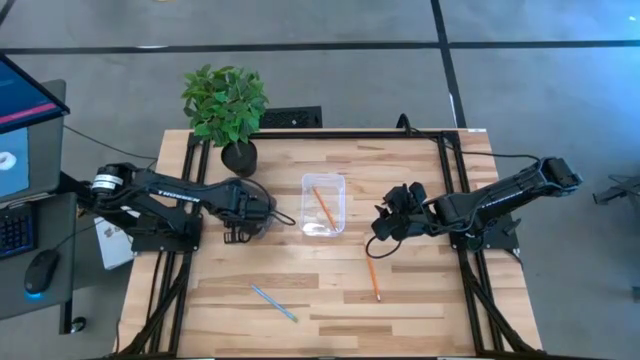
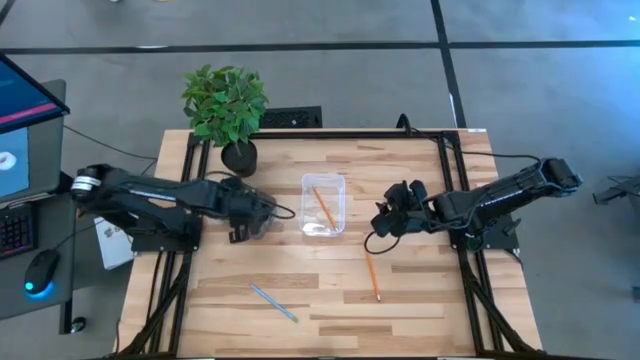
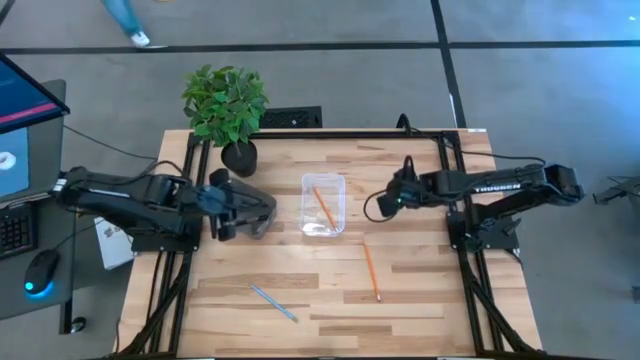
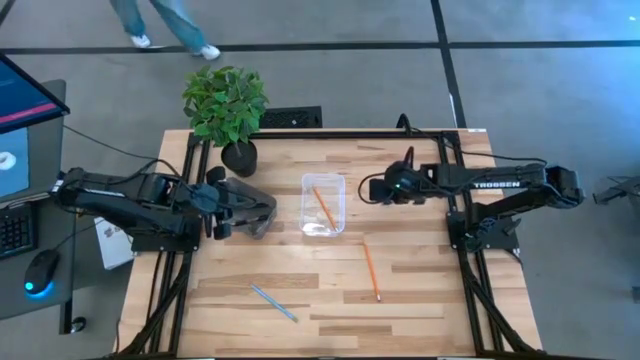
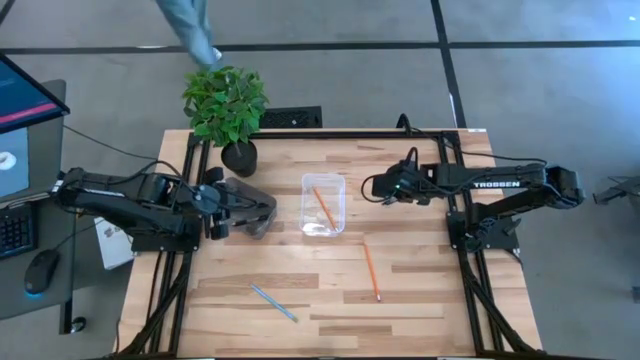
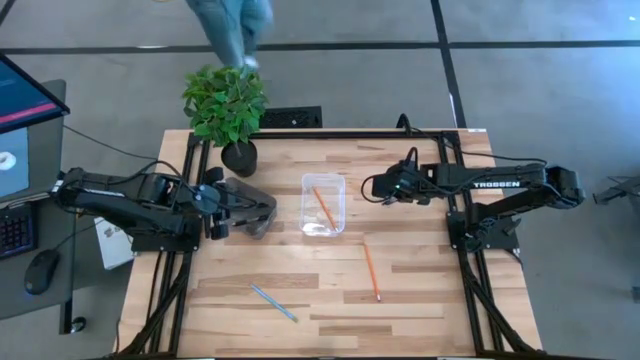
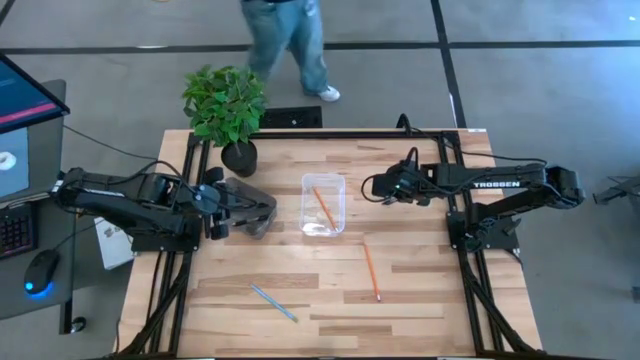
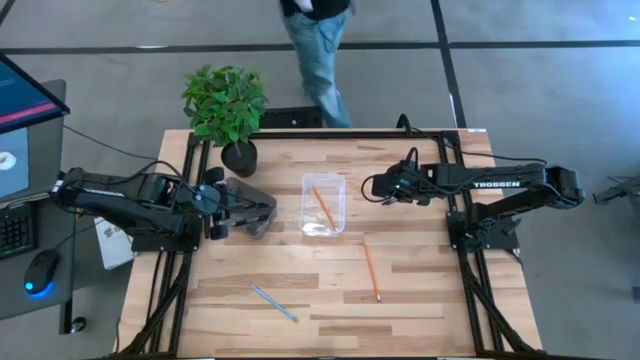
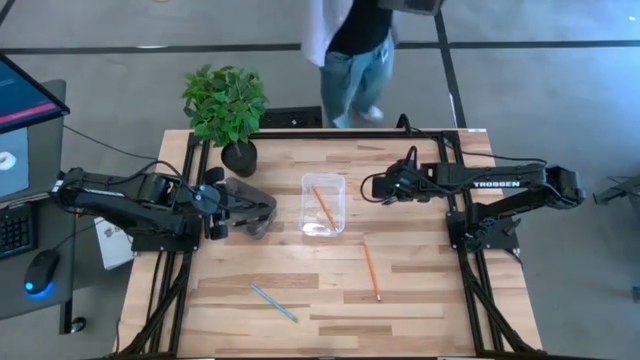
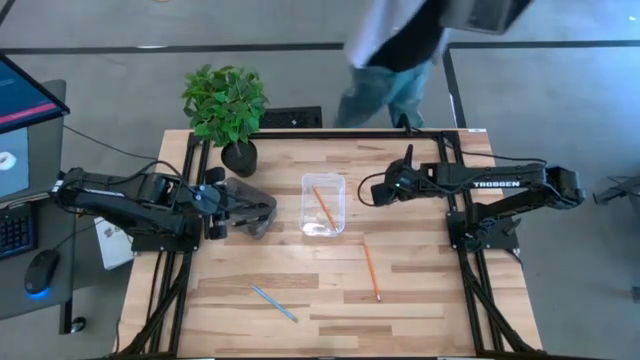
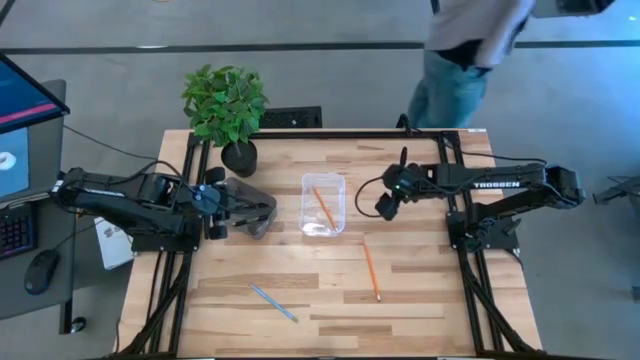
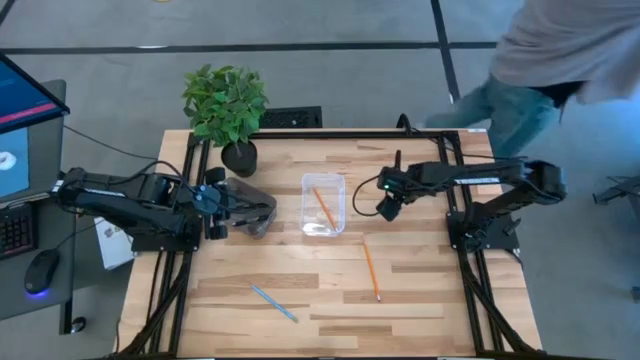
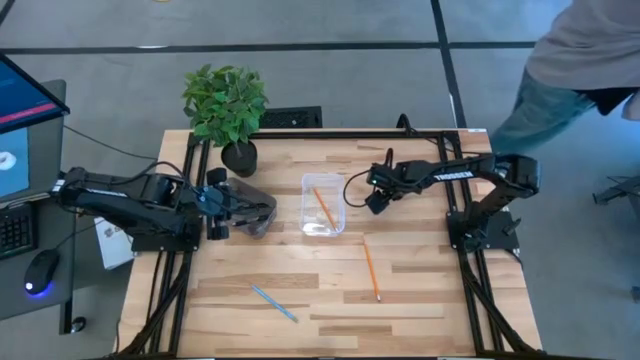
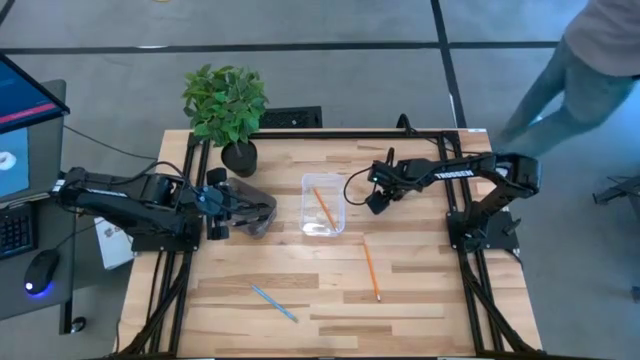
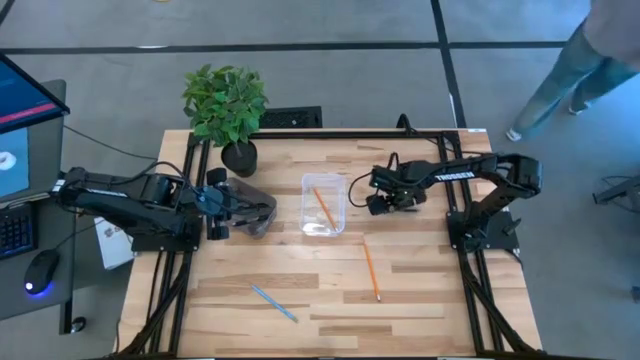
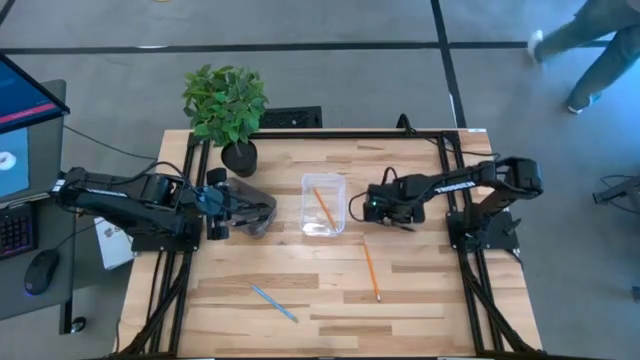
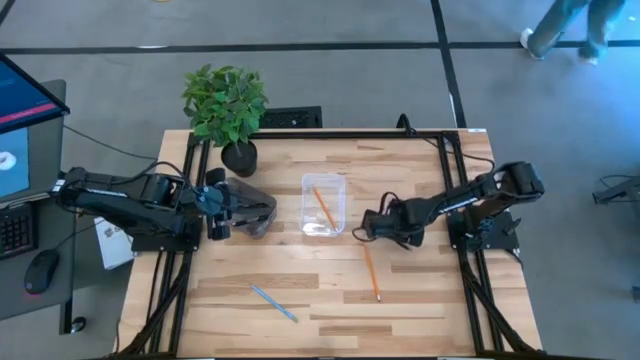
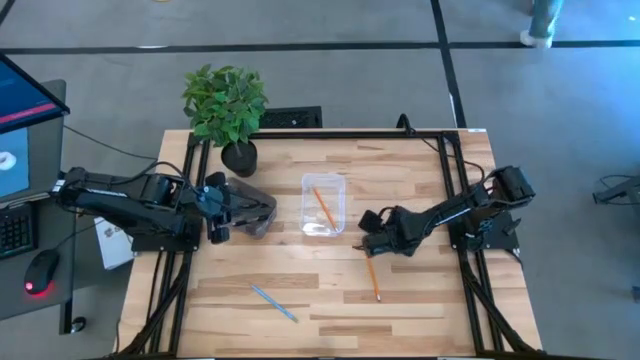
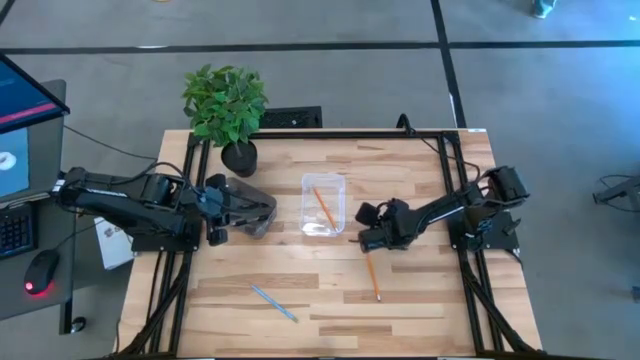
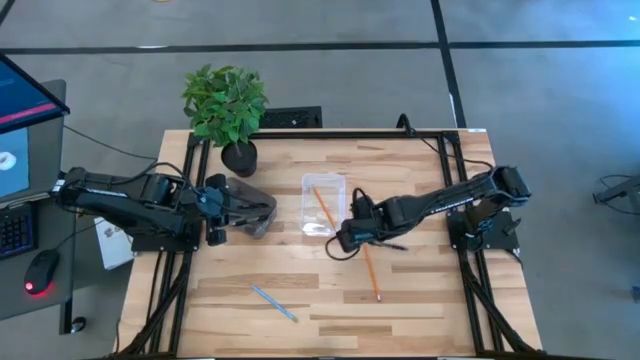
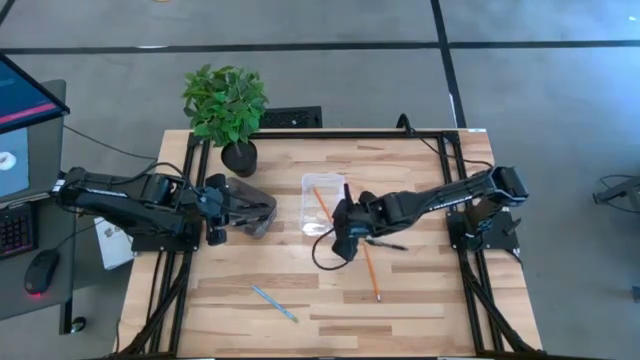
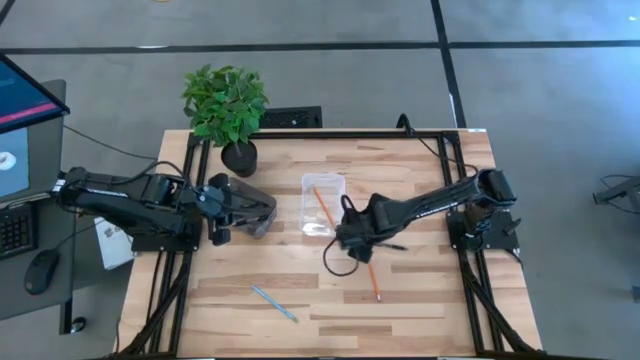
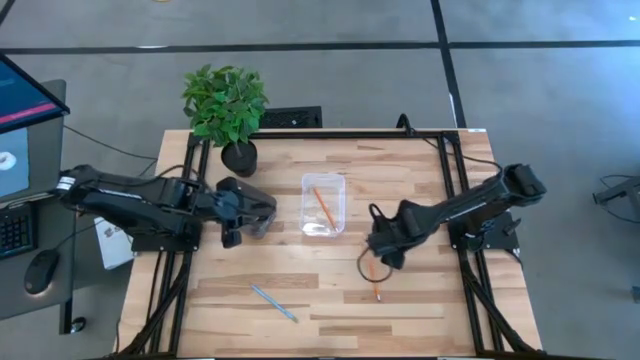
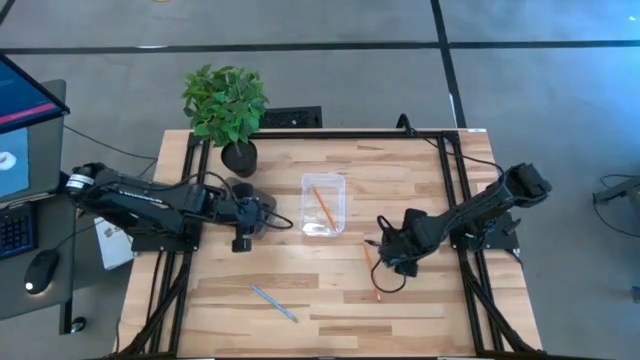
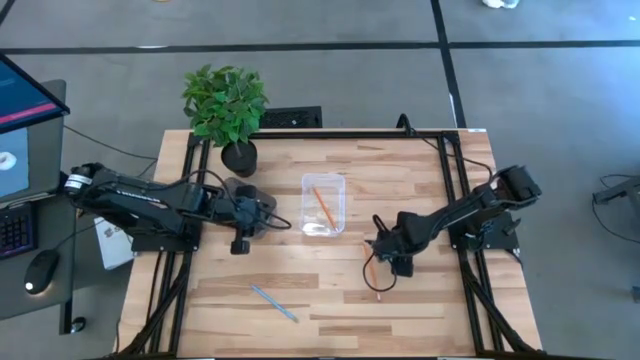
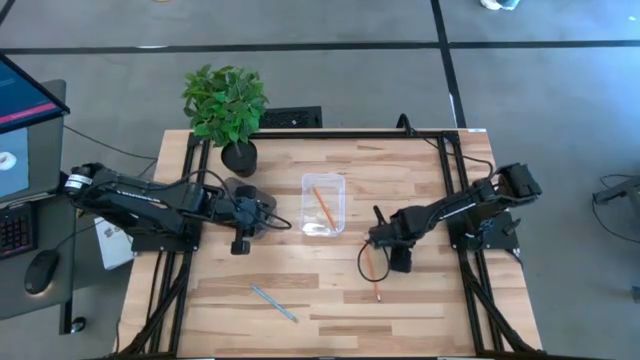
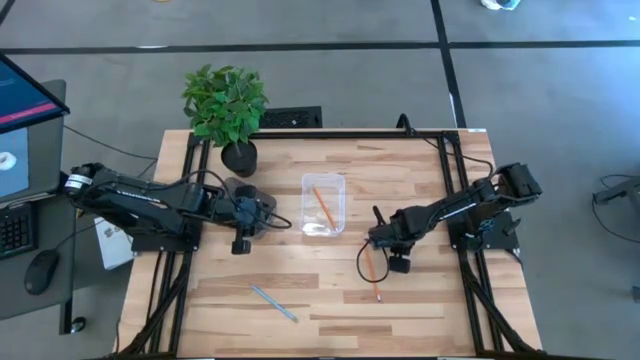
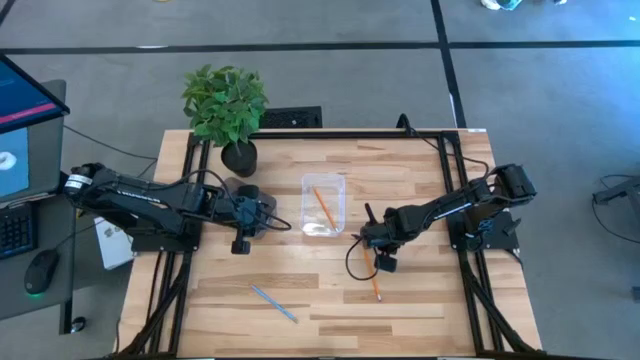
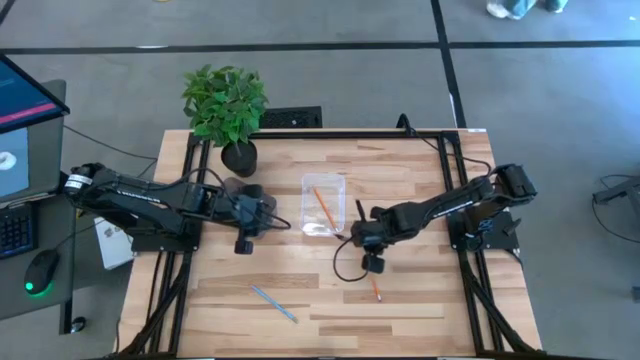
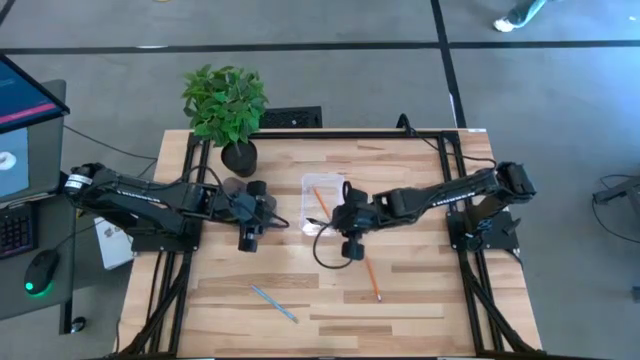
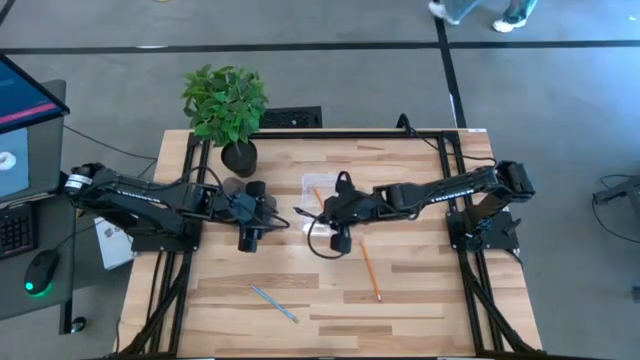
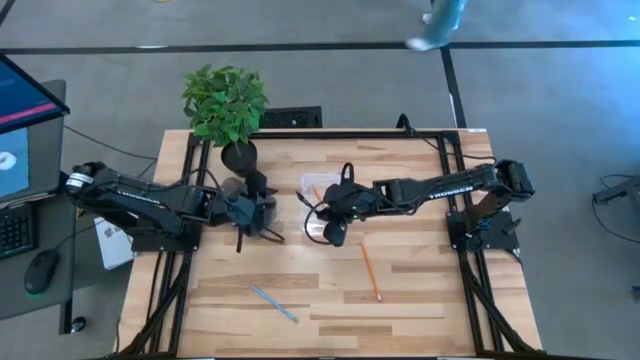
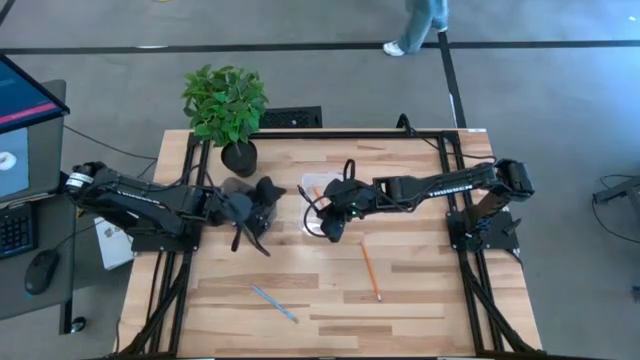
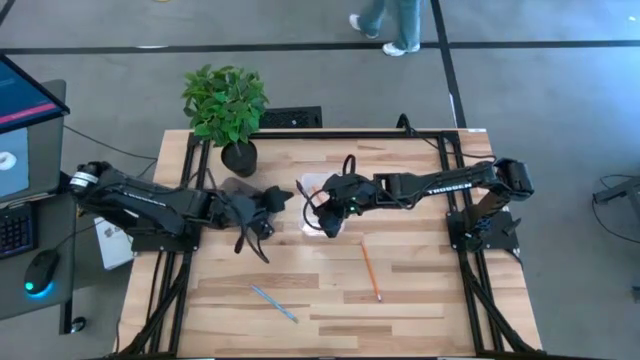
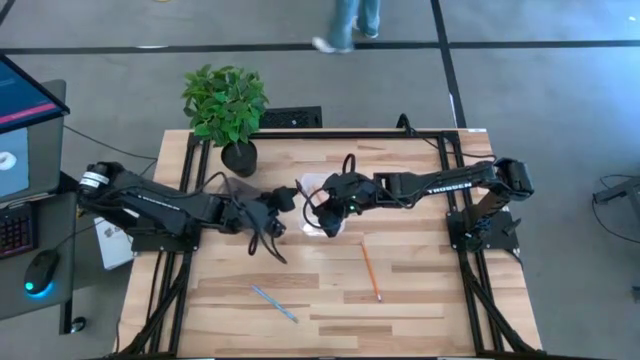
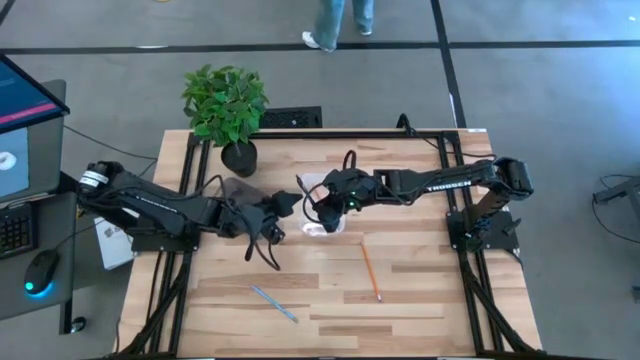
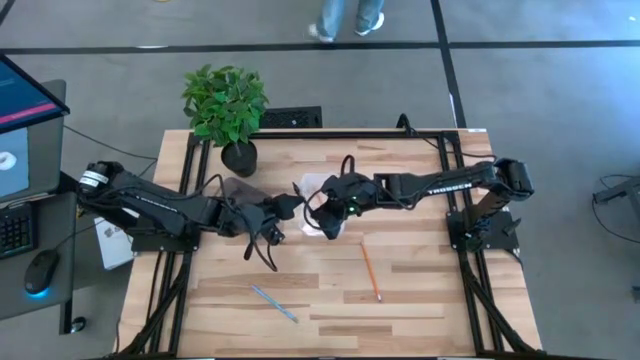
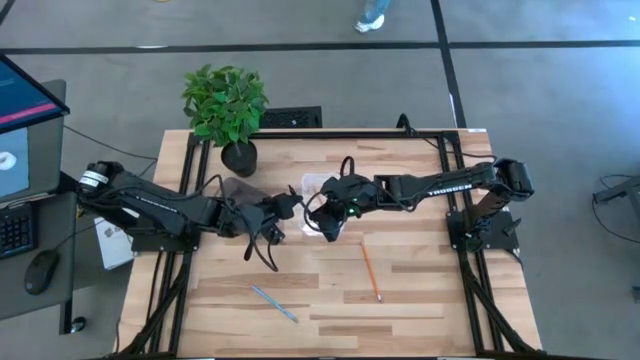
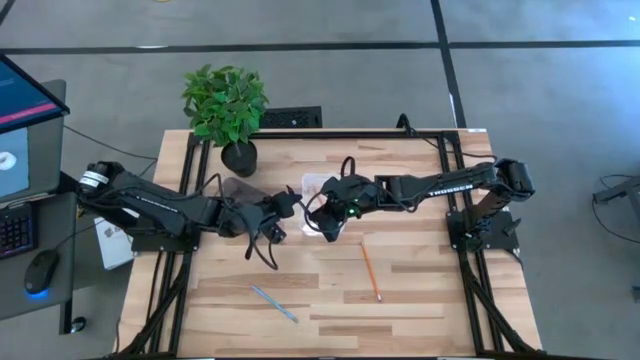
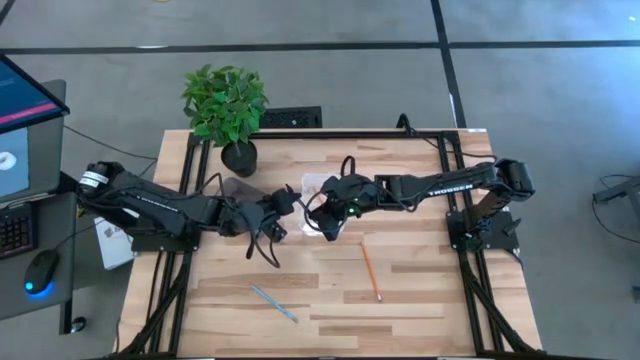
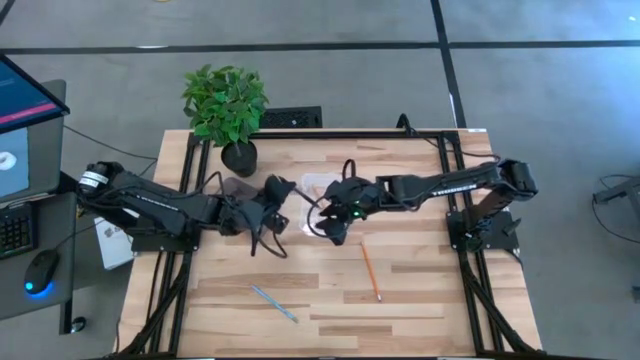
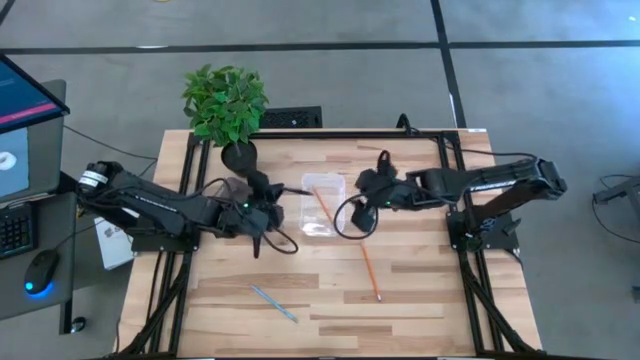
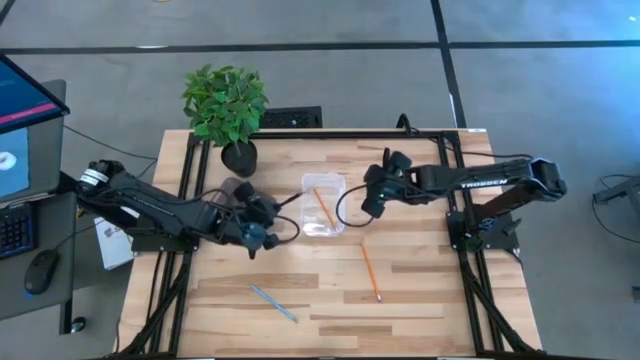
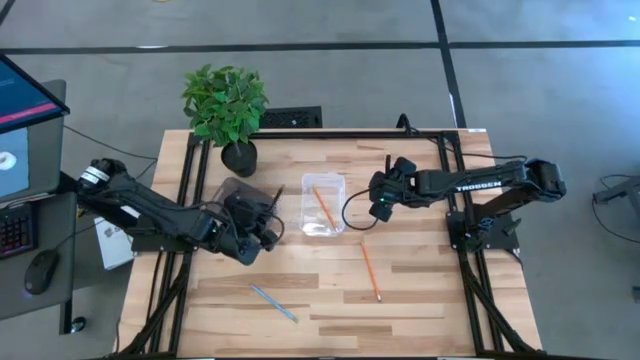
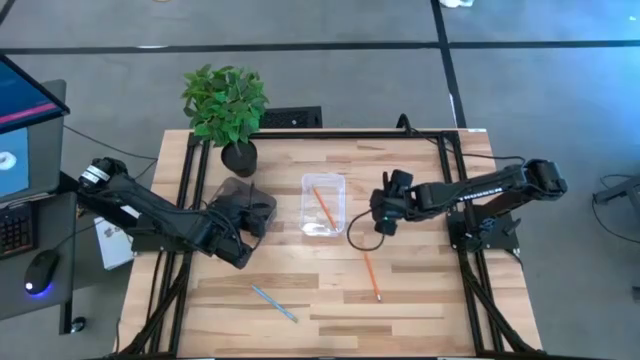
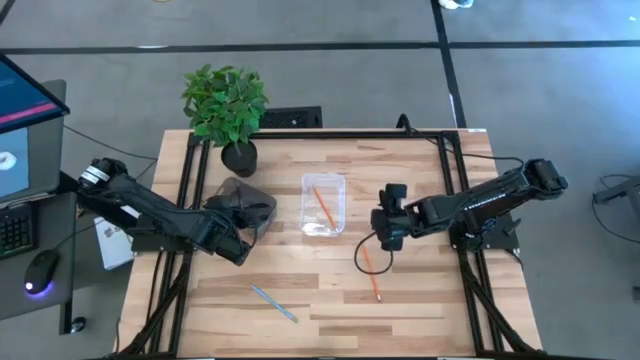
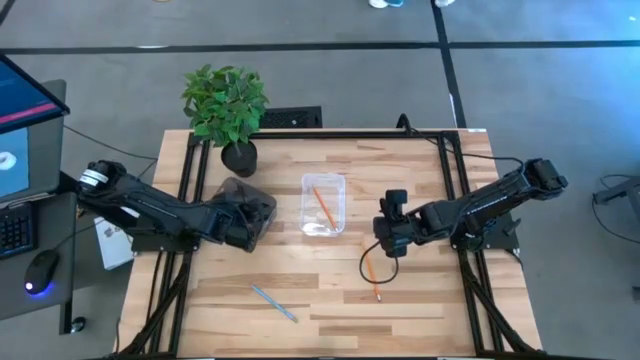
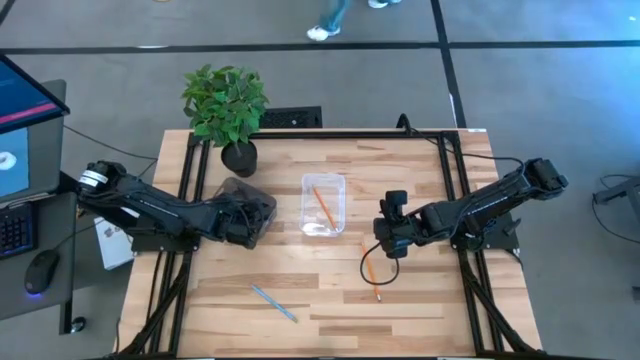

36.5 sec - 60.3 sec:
Task: Sort pens & pencils
Put the black pen into the black bin
